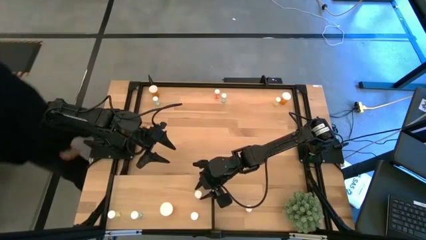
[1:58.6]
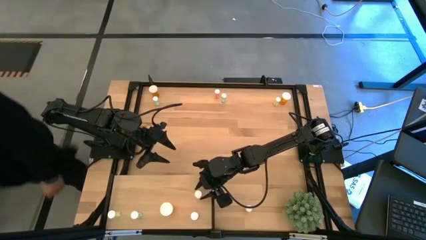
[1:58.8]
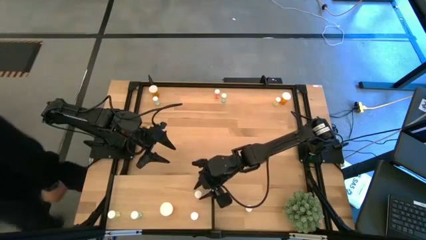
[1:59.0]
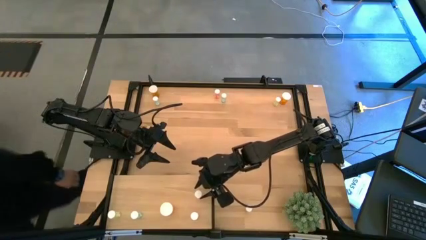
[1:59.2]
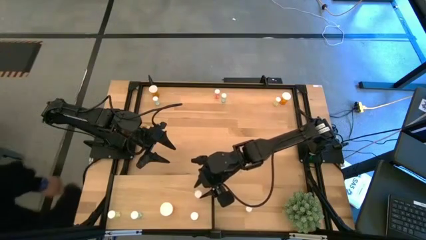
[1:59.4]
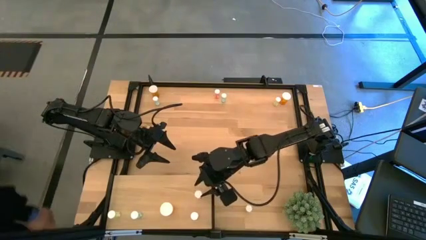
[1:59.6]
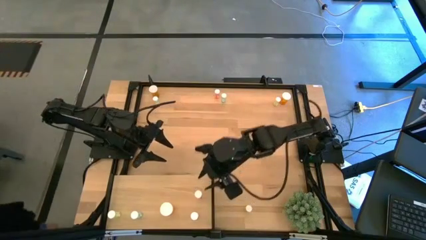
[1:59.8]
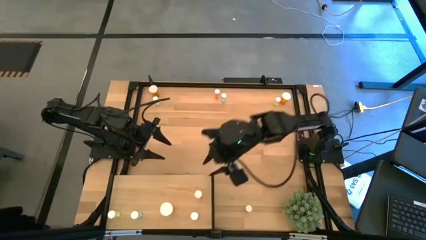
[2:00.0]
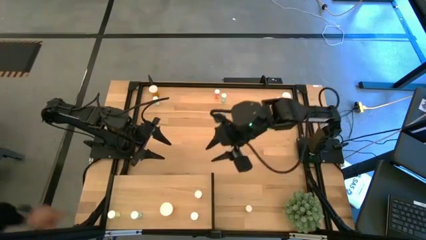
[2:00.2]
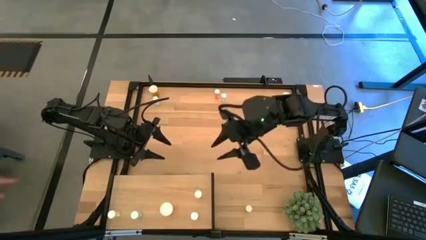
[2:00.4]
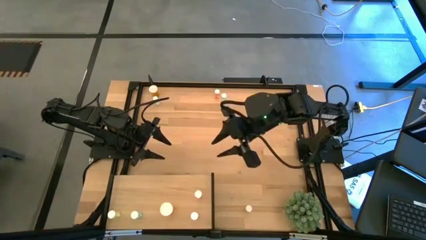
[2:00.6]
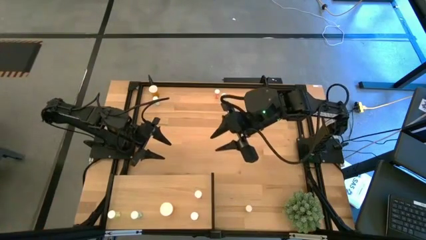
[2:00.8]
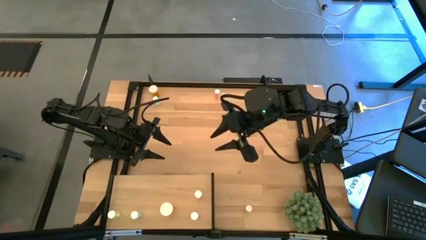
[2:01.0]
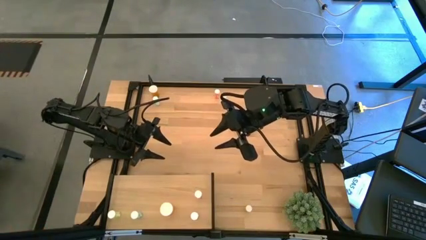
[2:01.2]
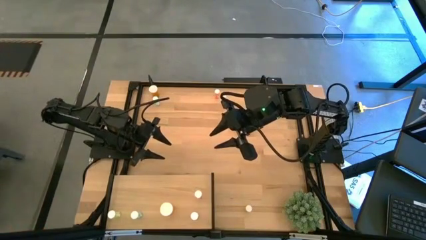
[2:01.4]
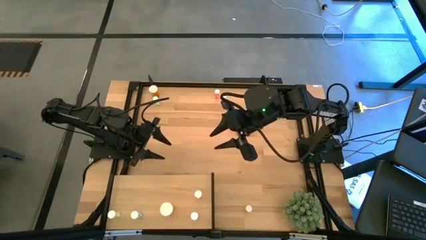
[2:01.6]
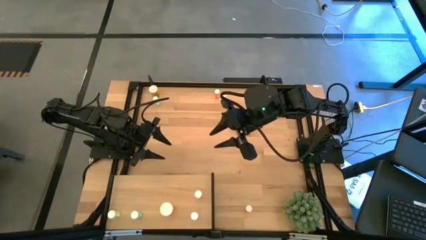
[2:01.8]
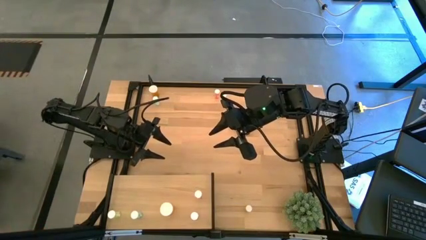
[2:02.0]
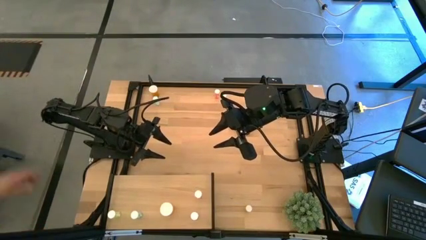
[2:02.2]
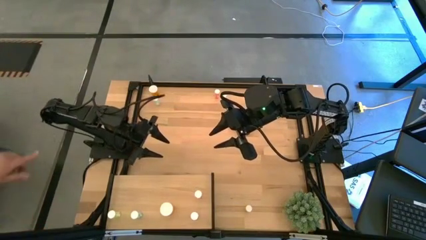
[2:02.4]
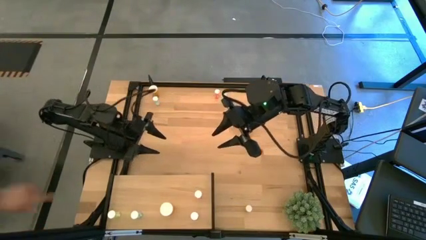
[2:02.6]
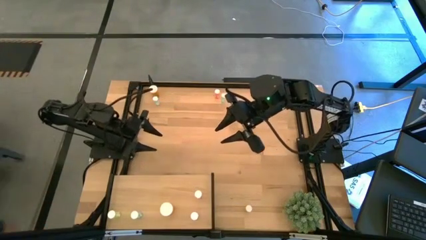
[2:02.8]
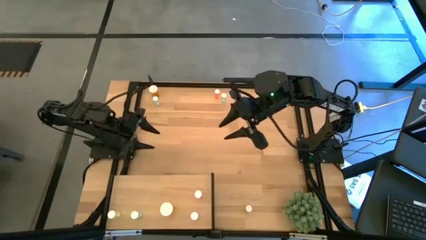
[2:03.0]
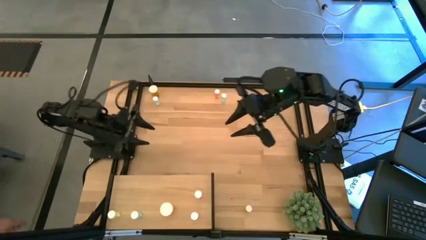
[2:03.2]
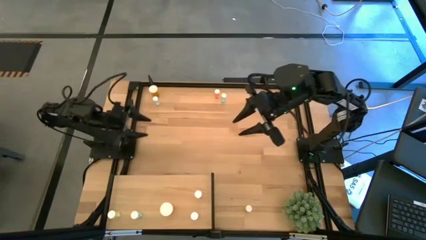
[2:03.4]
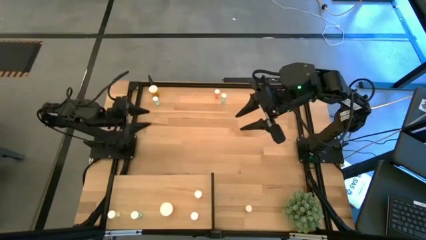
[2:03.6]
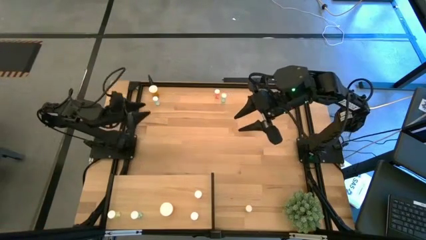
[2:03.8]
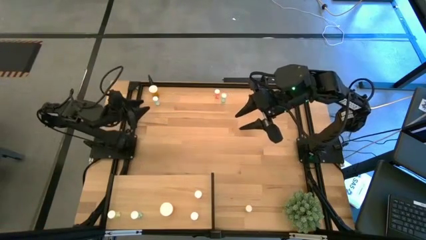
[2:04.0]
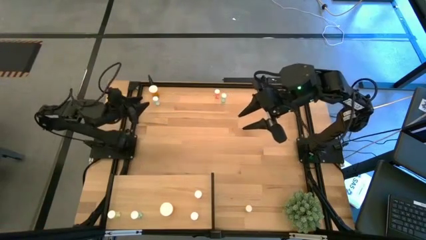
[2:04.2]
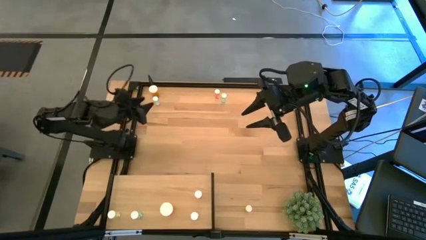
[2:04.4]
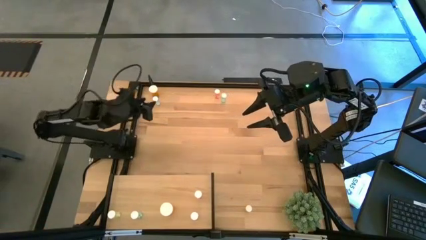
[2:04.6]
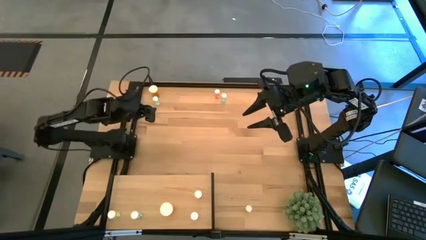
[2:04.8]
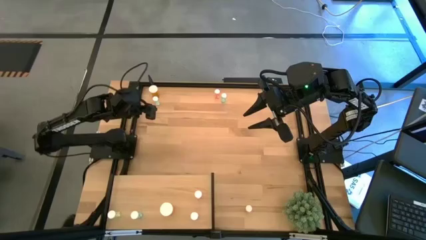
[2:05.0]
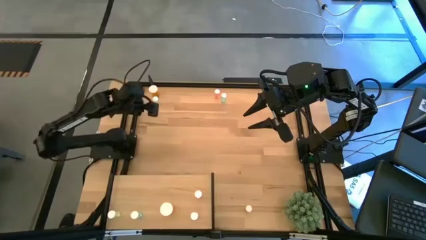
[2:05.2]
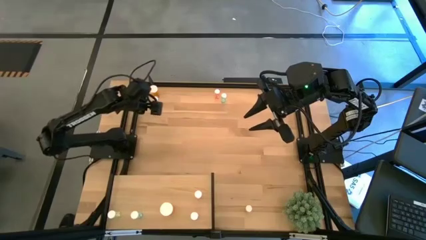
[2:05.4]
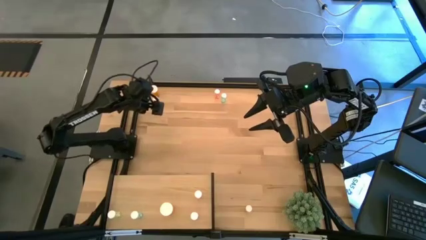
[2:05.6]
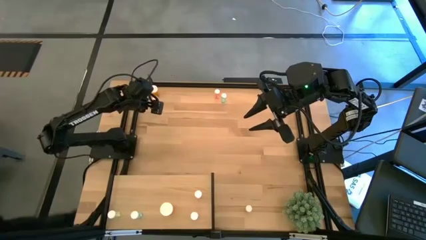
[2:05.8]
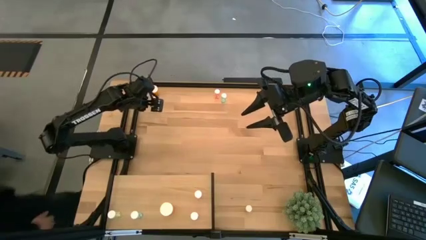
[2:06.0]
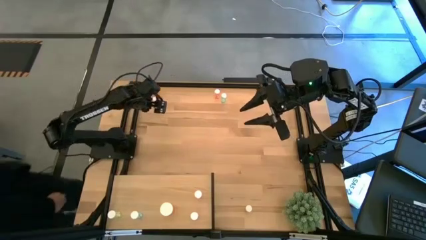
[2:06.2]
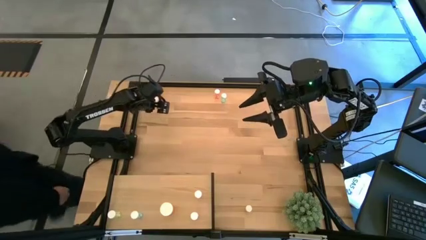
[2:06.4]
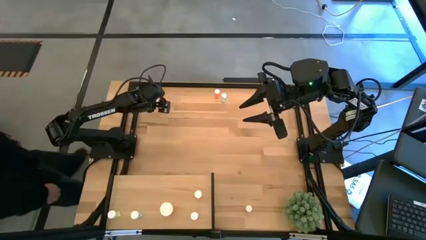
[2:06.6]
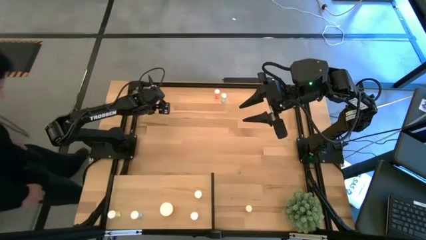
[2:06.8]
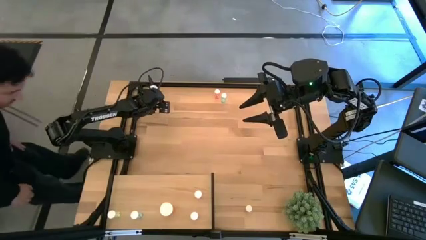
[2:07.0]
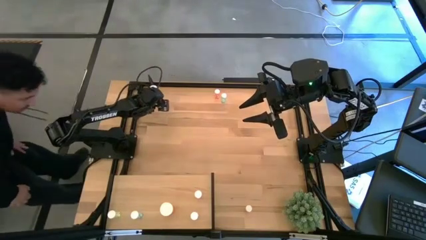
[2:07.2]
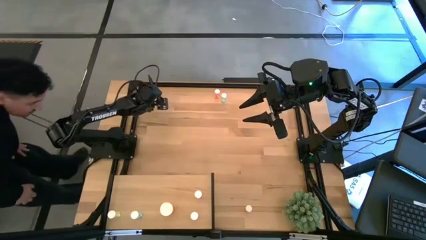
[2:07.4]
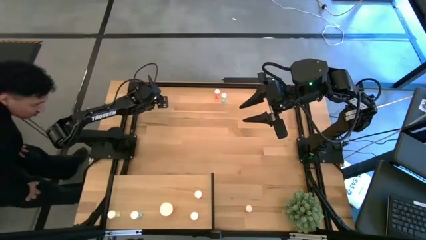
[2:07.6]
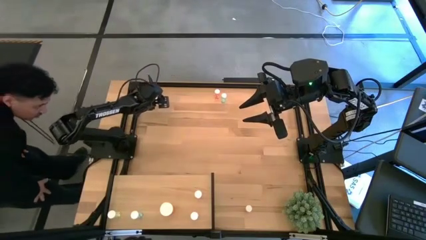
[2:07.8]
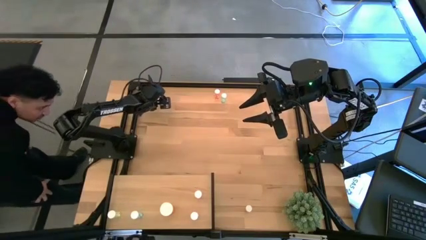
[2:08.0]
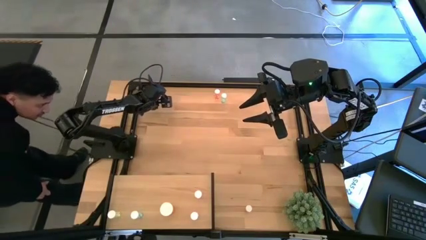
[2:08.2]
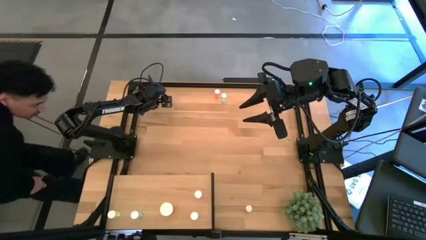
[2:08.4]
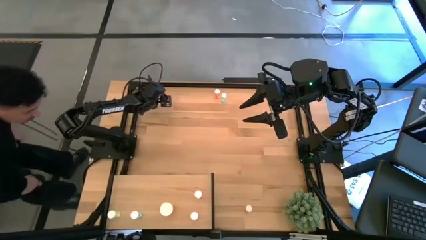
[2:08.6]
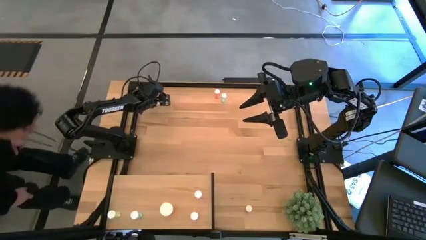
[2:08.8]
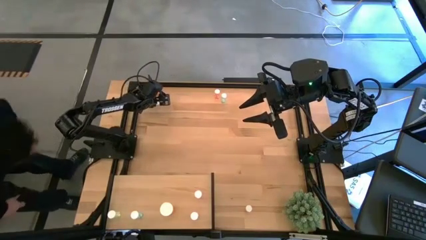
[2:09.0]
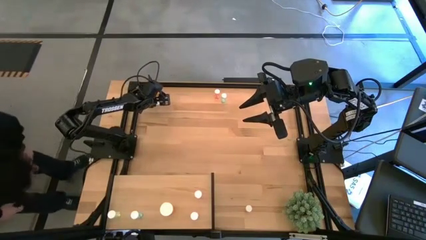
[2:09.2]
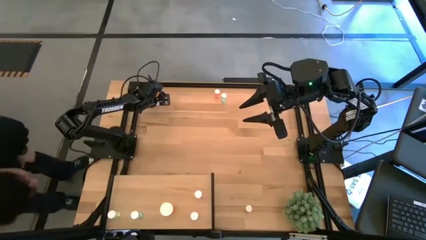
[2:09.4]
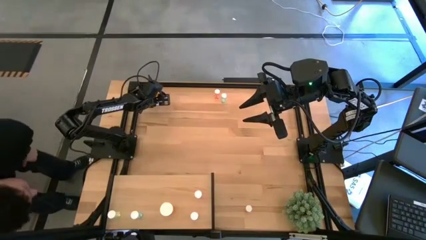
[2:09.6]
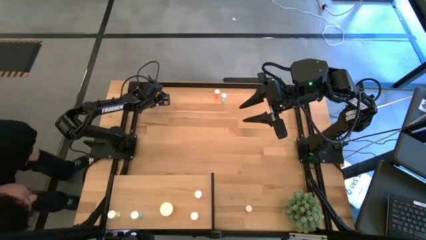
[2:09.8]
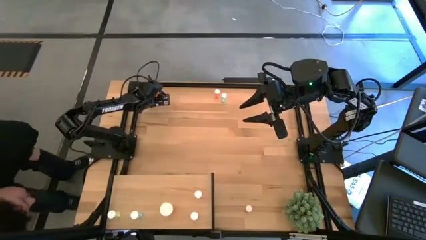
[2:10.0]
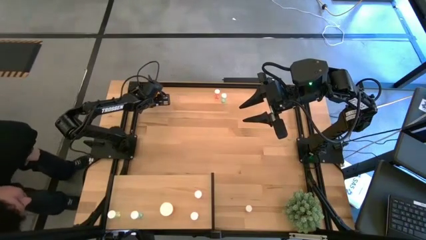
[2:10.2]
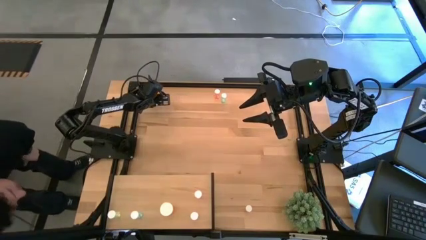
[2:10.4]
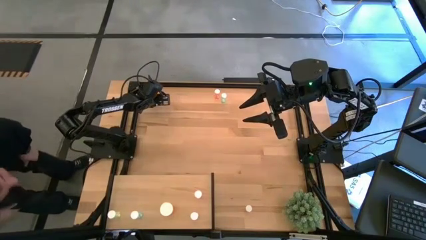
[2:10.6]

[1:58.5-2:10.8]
Task: Pick and place medicine bottles onto shelf by color
Put the top left blue pill bottle on the shelf aligned with the other blue pill bottle

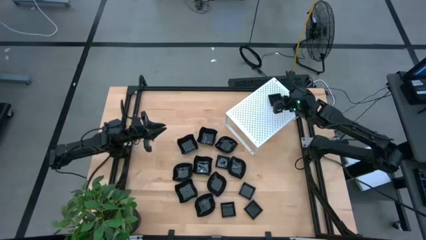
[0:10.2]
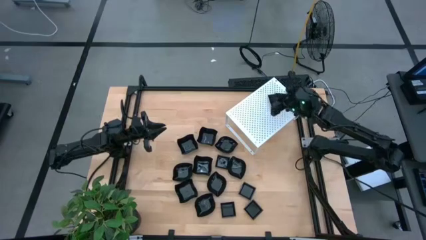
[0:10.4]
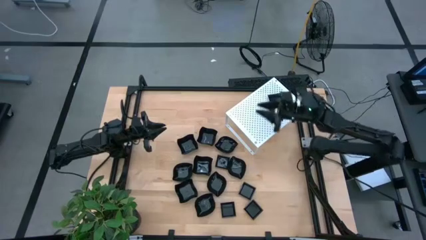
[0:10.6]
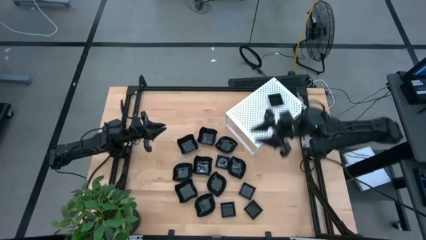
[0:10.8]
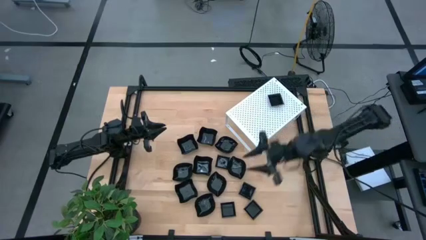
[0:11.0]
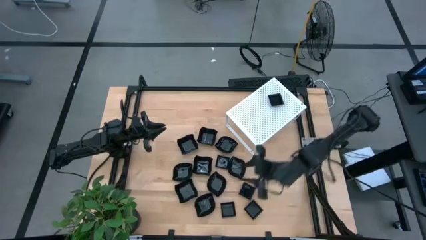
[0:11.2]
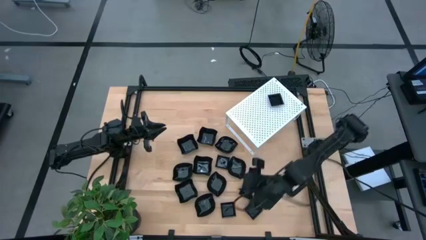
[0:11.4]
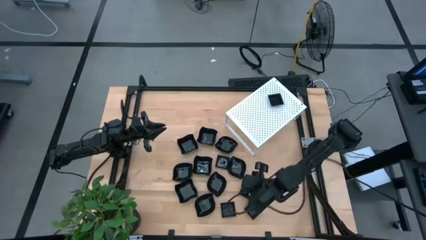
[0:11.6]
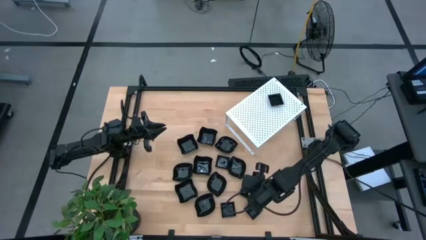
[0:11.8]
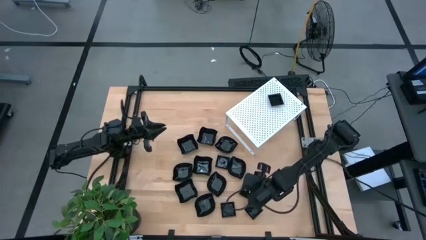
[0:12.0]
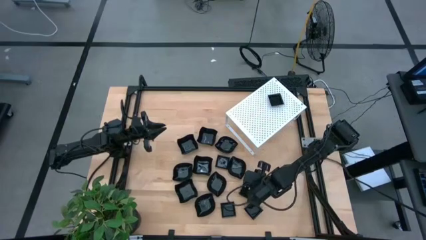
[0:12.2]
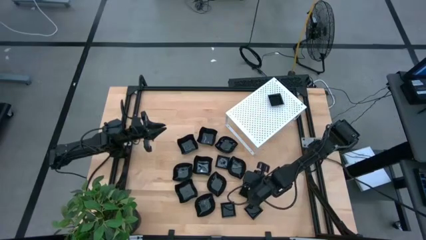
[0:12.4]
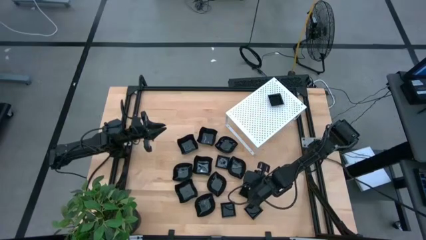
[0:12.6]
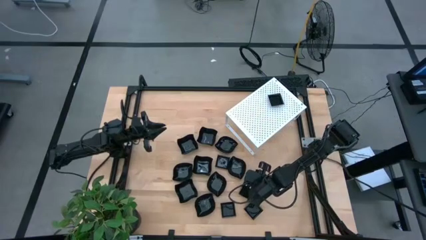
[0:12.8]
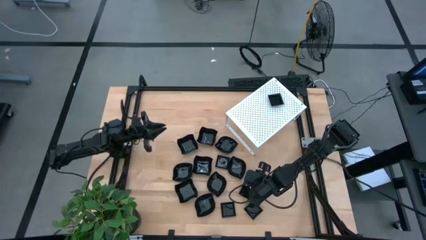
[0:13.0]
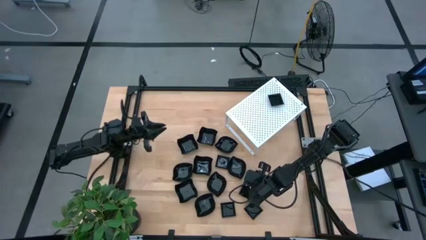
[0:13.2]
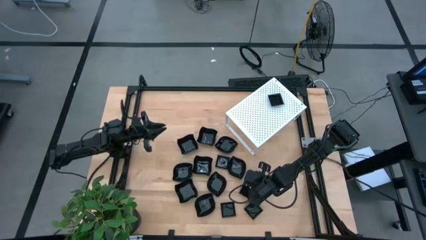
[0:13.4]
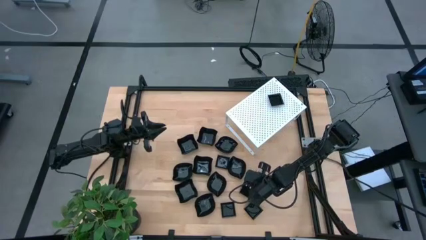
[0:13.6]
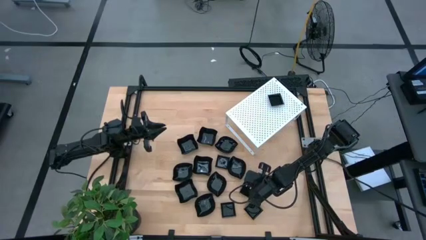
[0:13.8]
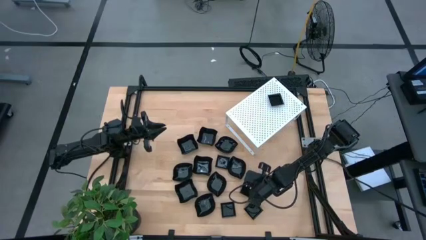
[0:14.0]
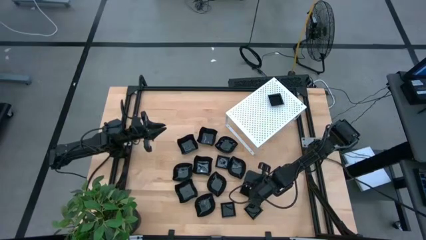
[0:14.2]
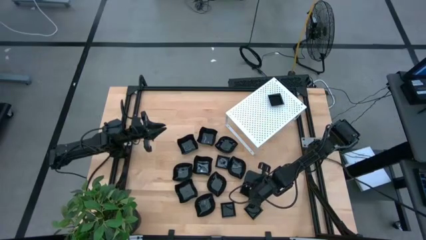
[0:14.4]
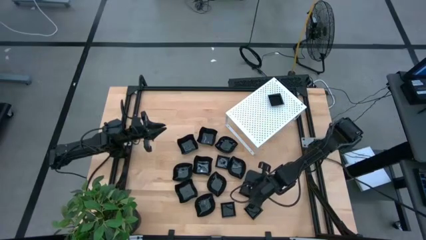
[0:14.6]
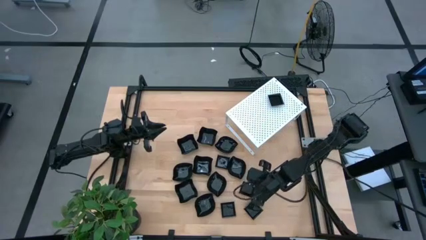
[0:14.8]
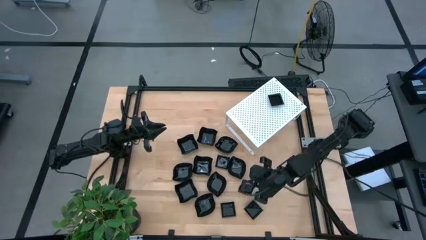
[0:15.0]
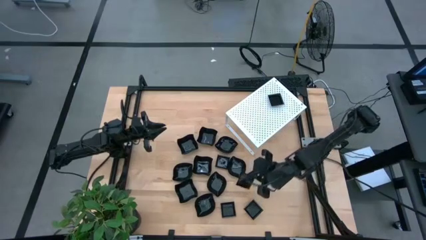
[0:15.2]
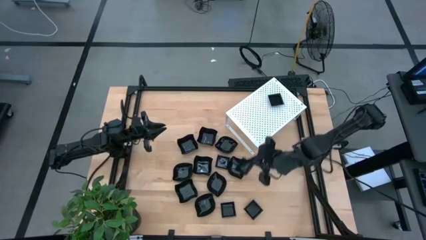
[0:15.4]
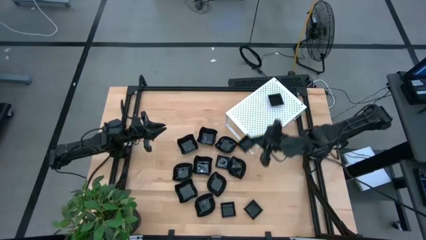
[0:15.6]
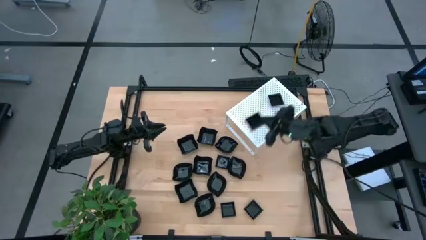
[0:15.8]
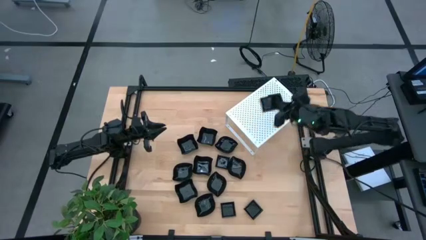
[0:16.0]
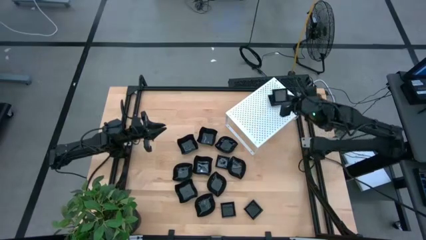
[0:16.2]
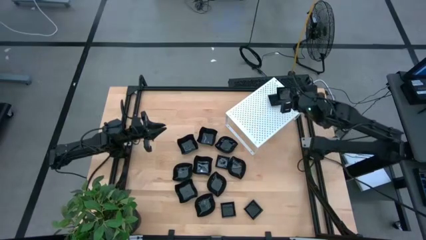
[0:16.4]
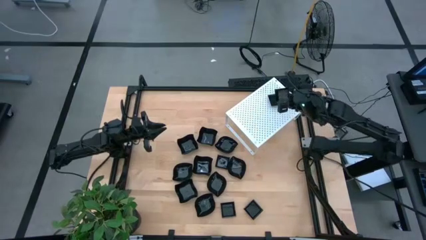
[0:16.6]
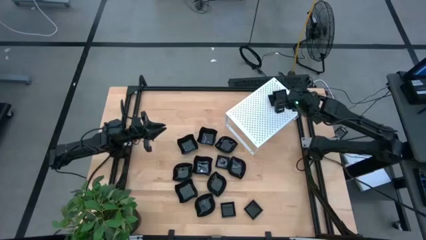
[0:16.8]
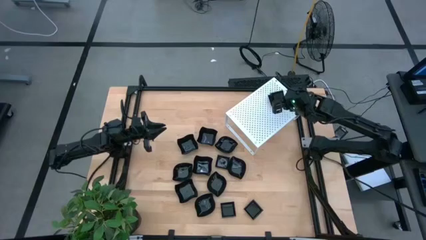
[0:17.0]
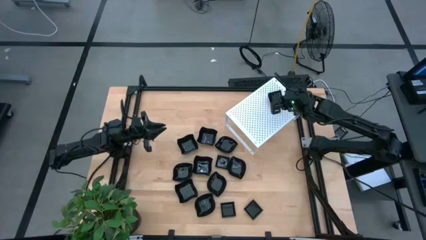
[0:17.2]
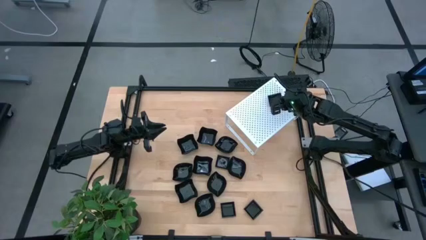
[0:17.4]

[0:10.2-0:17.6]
Task: Pick & Place Mini shaped plates
Stack the black square plate on top of the black square plate on the shelf
